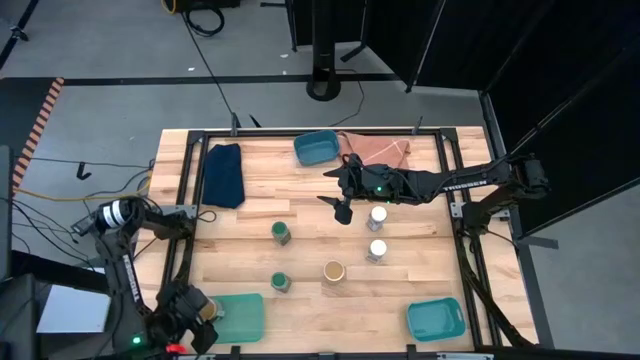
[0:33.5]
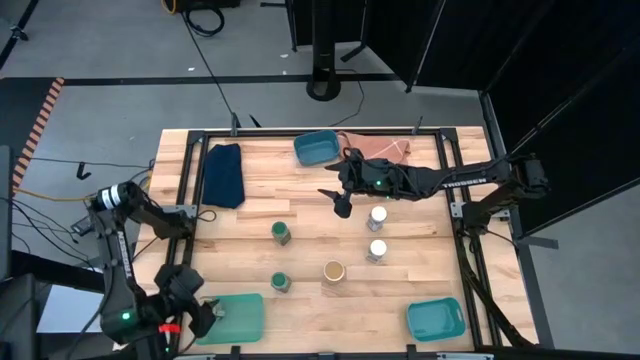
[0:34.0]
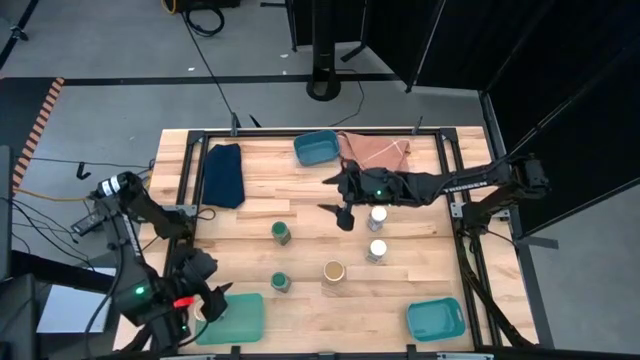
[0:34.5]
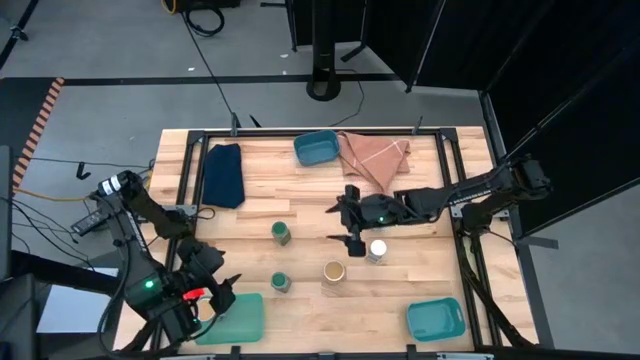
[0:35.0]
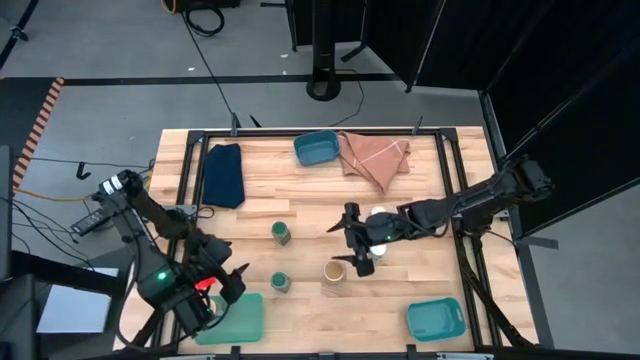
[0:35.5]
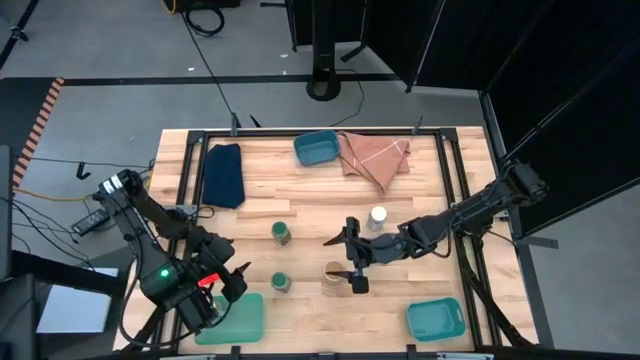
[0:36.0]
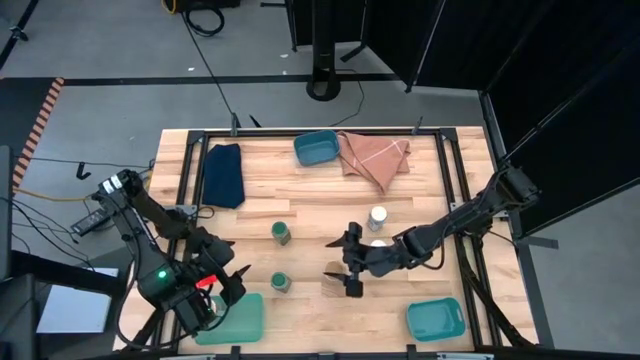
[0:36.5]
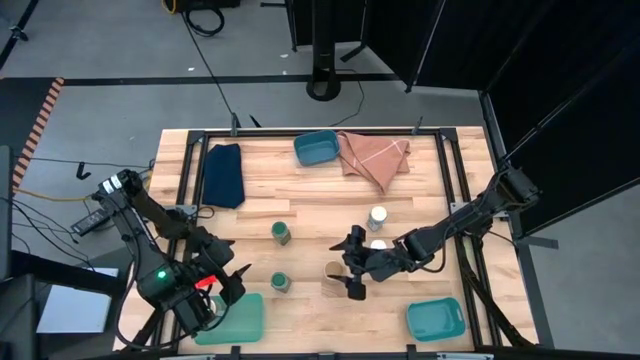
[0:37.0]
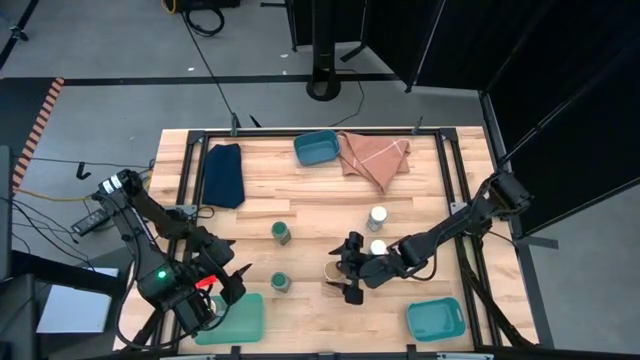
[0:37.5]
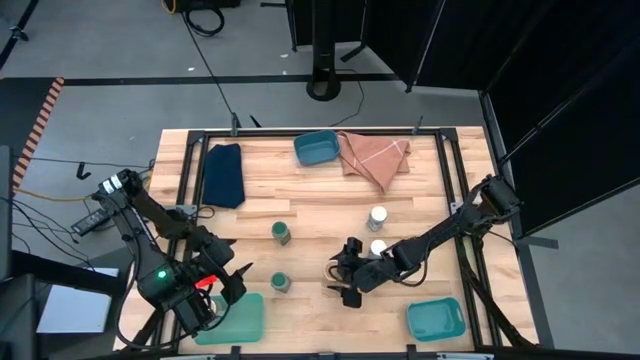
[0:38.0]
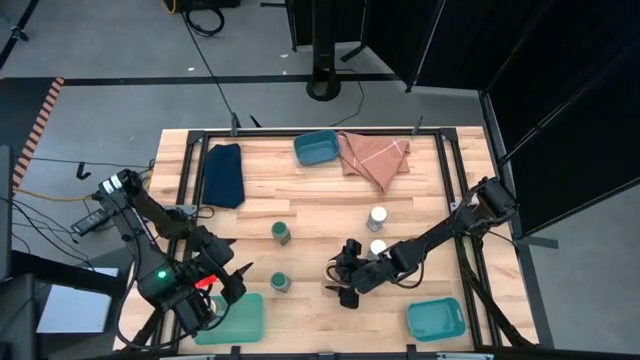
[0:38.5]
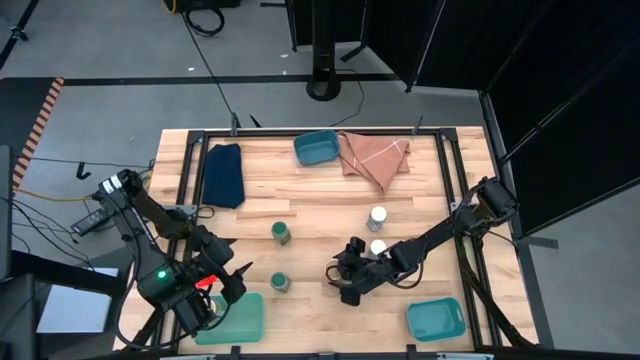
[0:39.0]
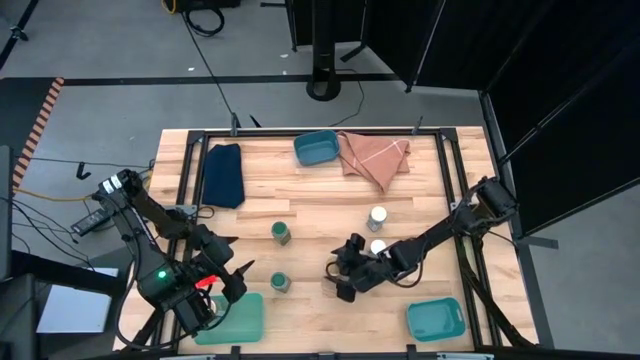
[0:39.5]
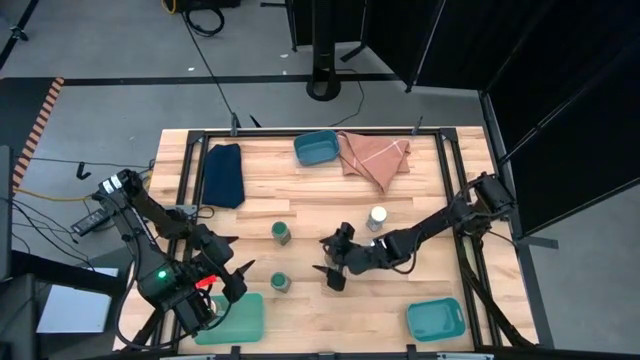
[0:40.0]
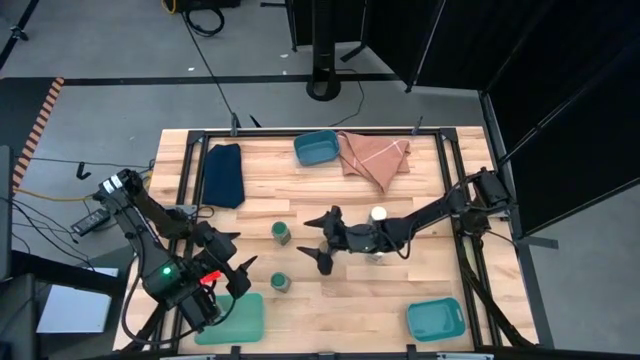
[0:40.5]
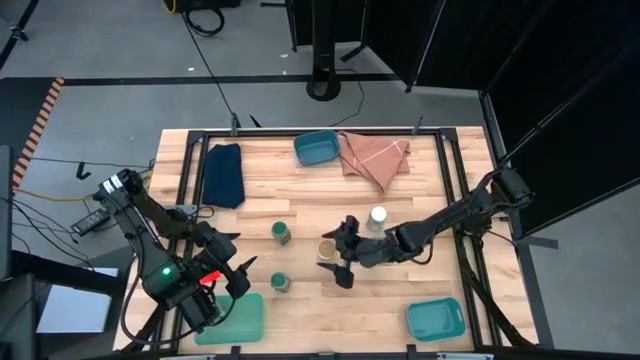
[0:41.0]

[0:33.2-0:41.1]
Task: Sort spices by type
Put the brown seasoning bottle into the light green bin

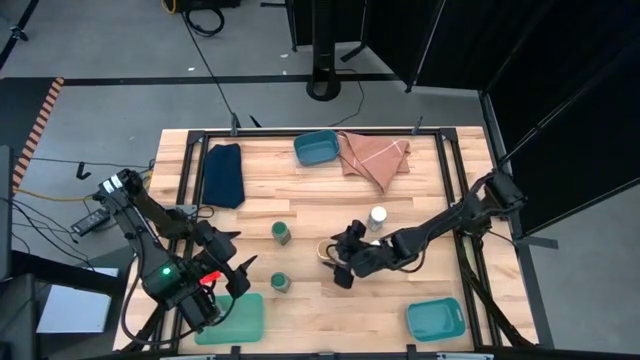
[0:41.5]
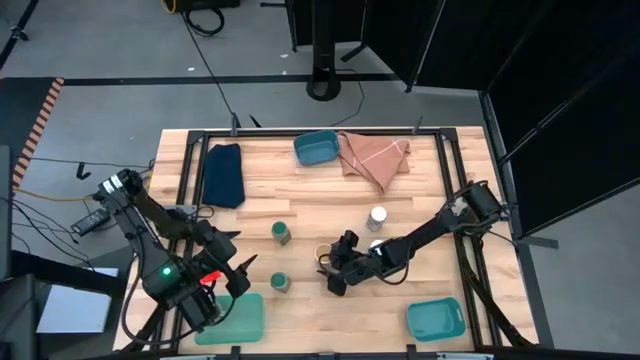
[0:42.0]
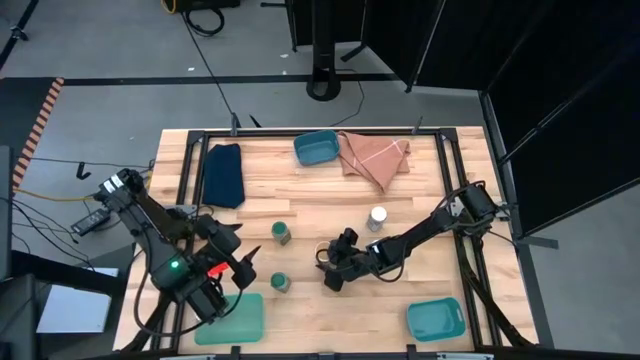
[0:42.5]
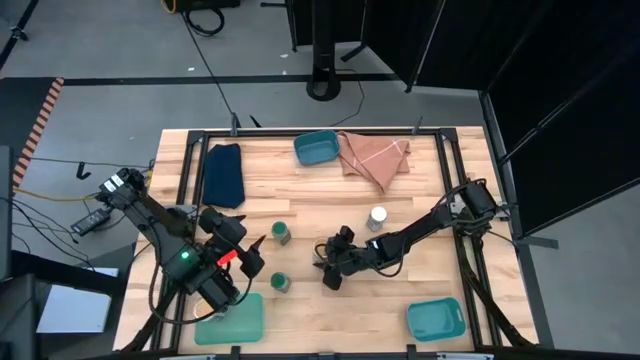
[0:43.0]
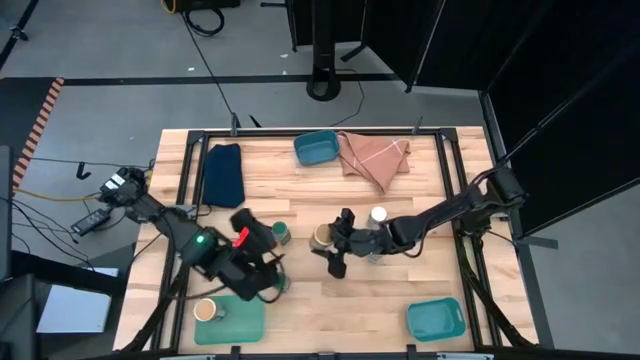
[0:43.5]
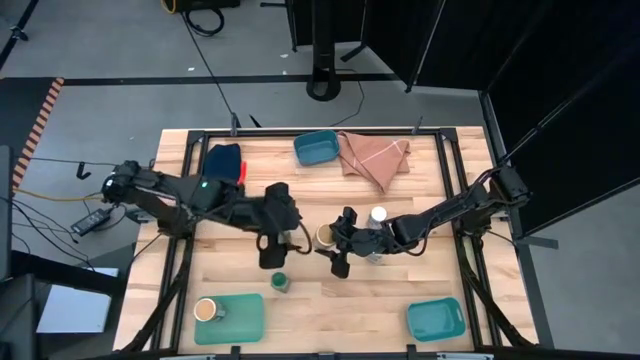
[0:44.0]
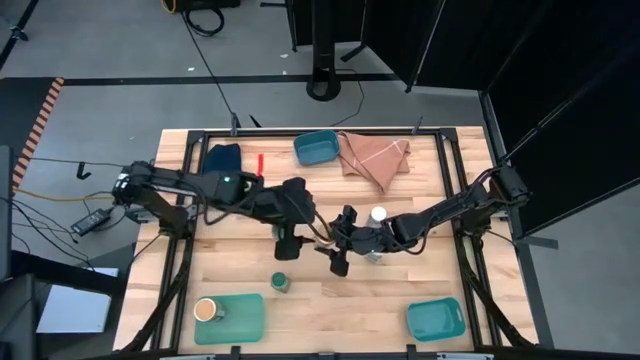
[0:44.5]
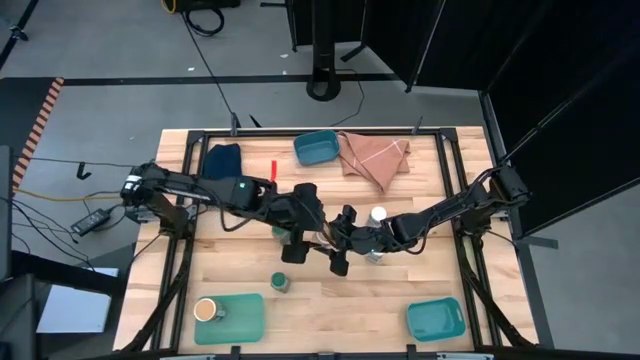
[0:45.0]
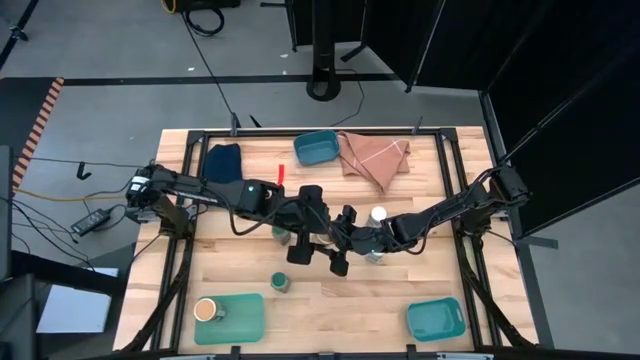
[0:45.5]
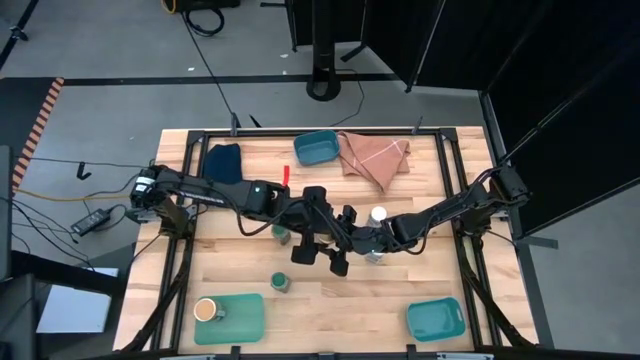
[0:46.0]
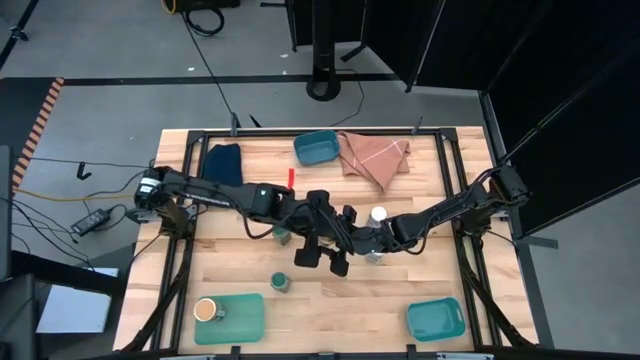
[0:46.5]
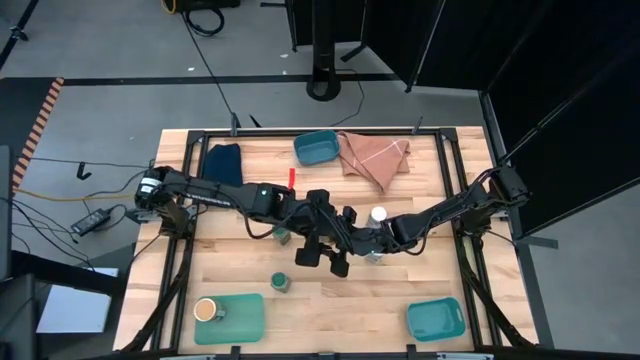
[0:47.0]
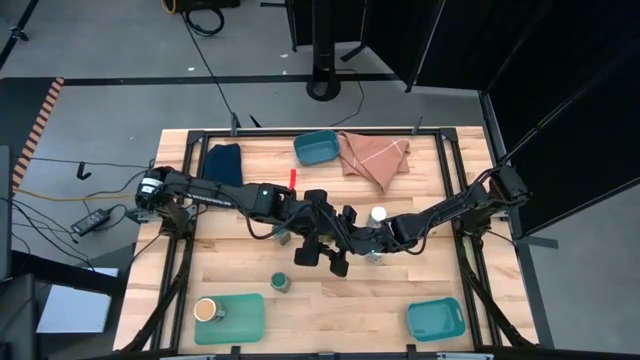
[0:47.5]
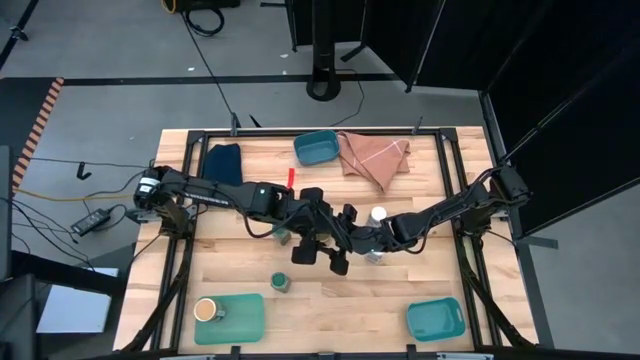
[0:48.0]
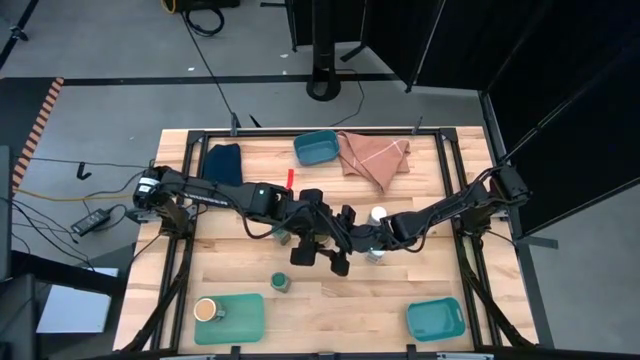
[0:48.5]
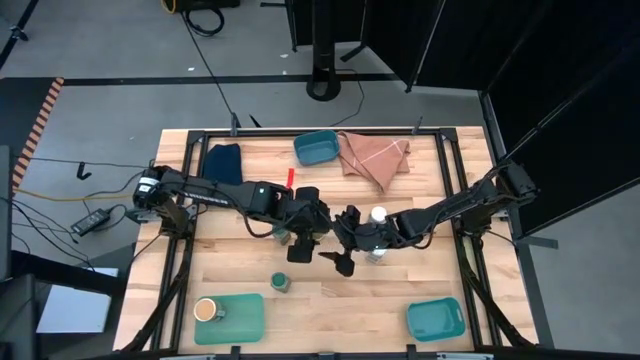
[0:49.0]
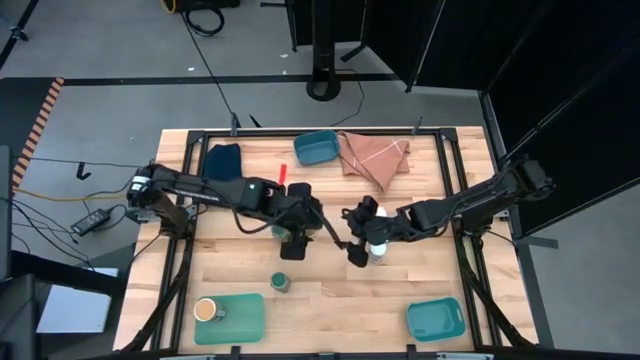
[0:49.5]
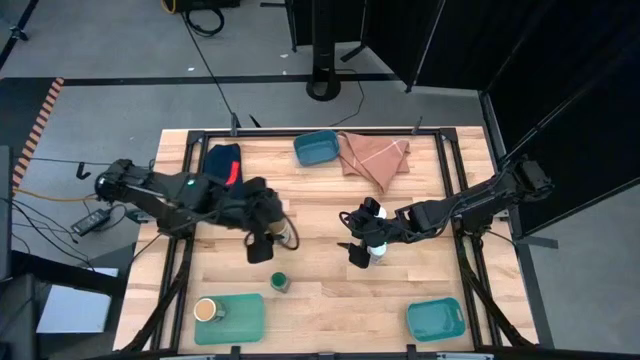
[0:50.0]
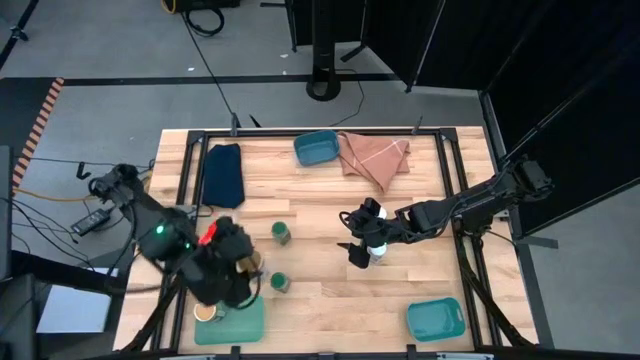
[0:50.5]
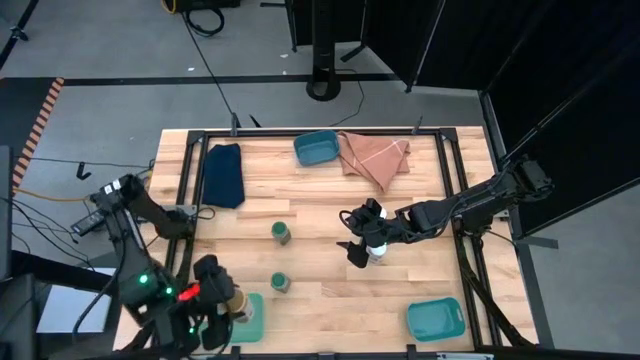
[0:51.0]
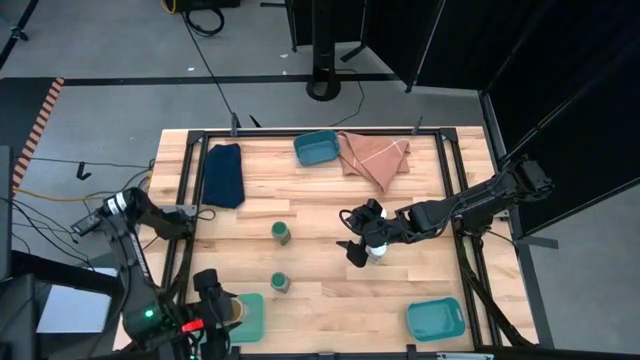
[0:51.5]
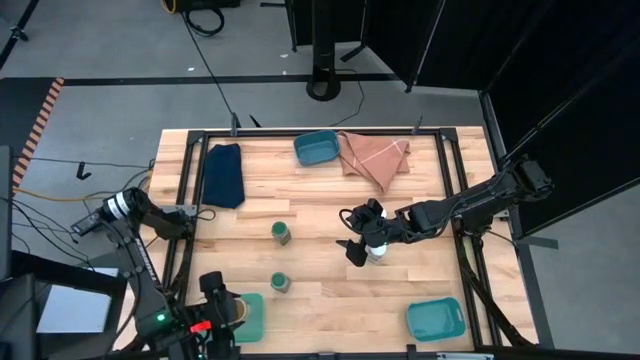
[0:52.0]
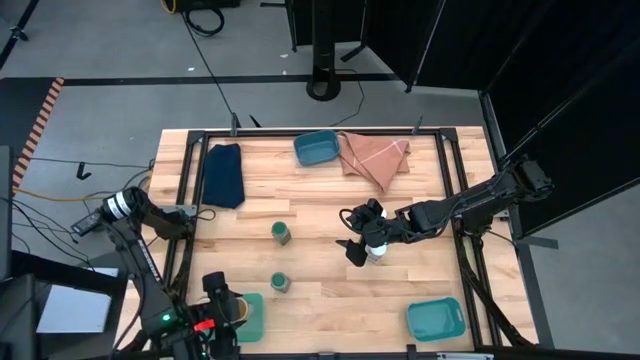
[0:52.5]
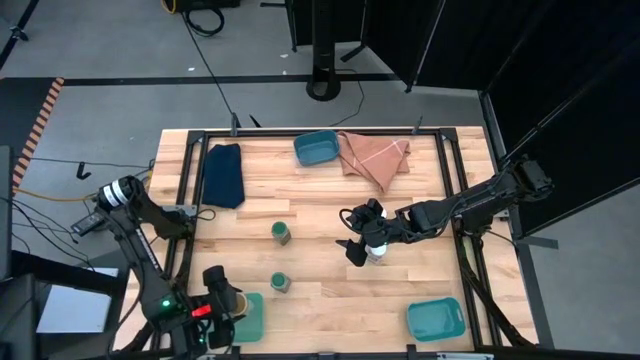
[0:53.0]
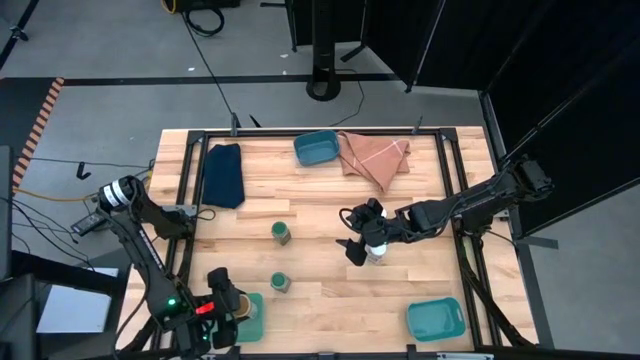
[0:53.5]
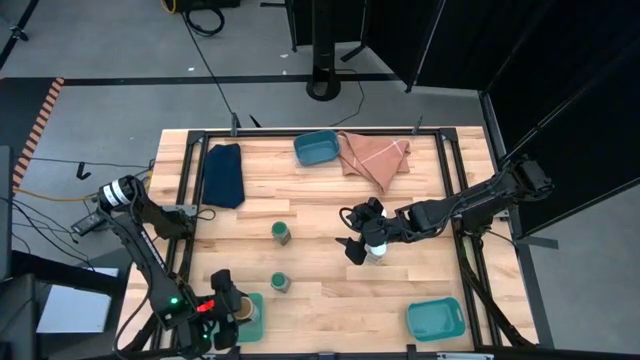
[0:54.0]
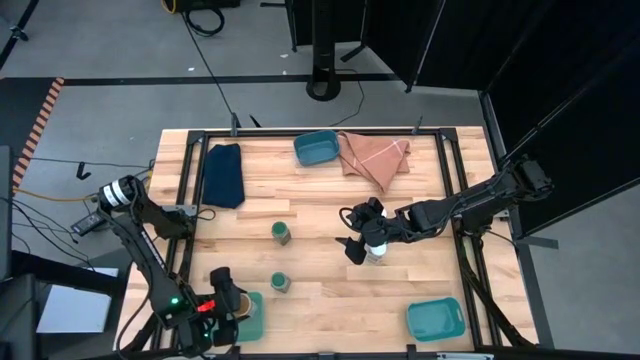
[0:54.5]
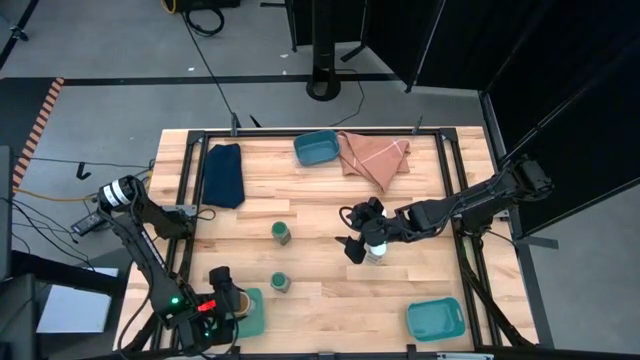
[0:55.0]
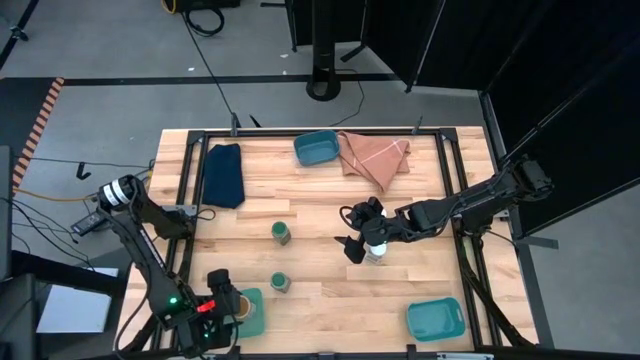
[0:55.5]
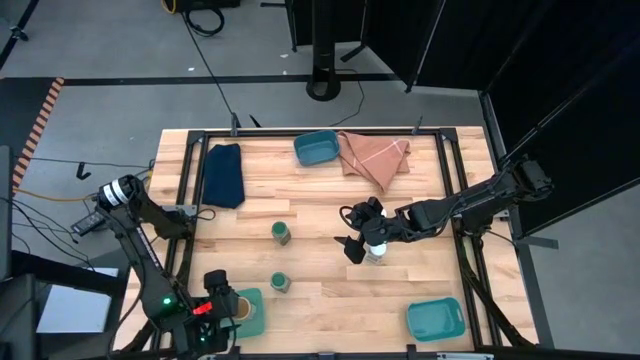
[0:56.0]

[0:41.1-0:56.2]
Put the brown seasoning bottle into the light green bin
